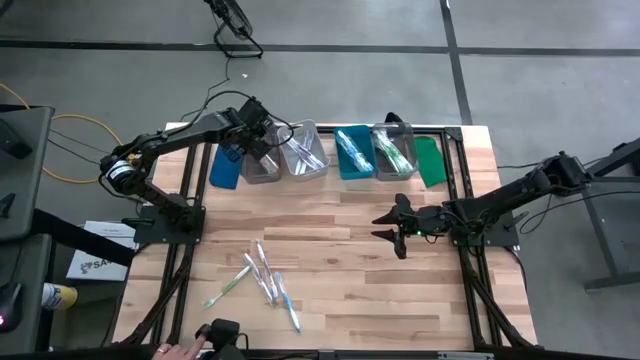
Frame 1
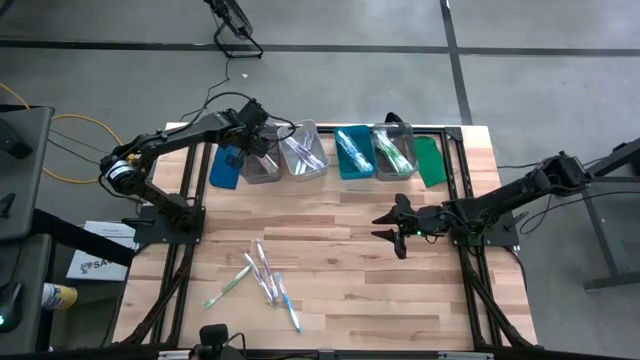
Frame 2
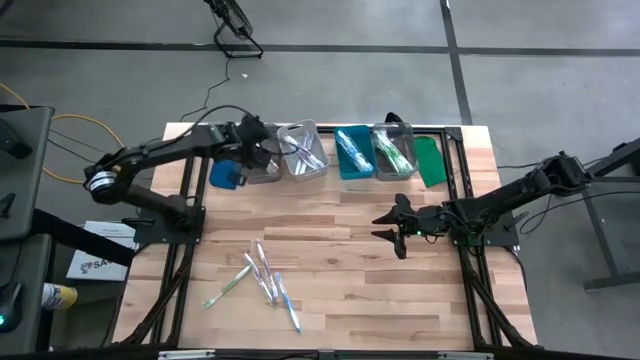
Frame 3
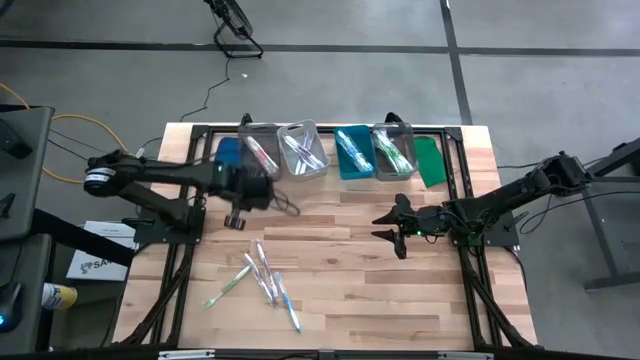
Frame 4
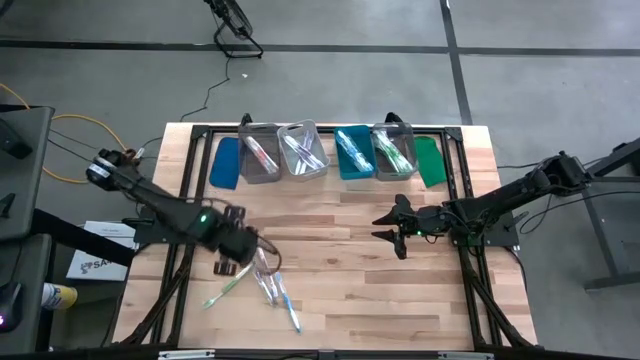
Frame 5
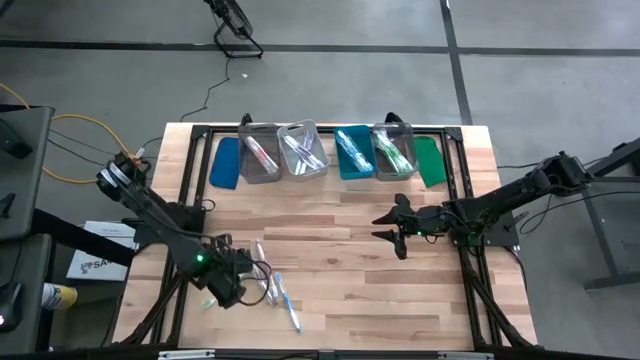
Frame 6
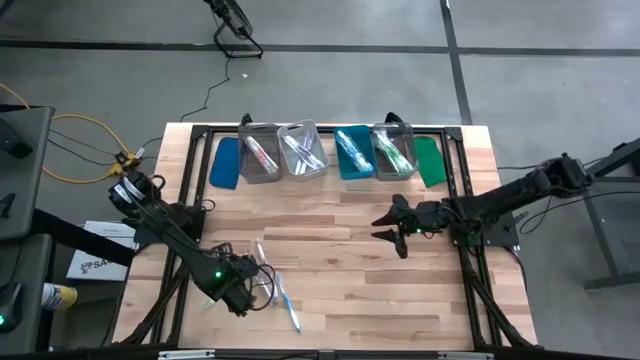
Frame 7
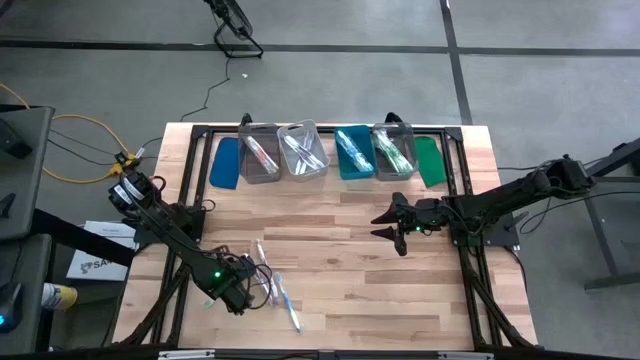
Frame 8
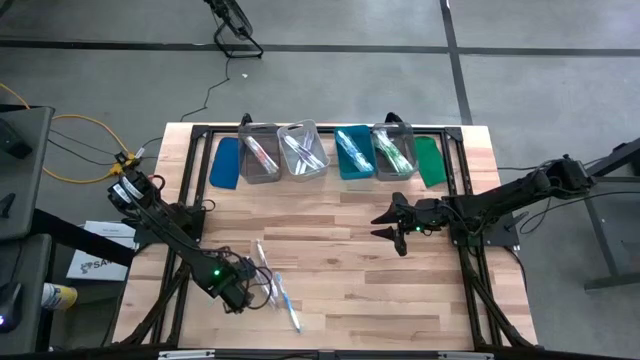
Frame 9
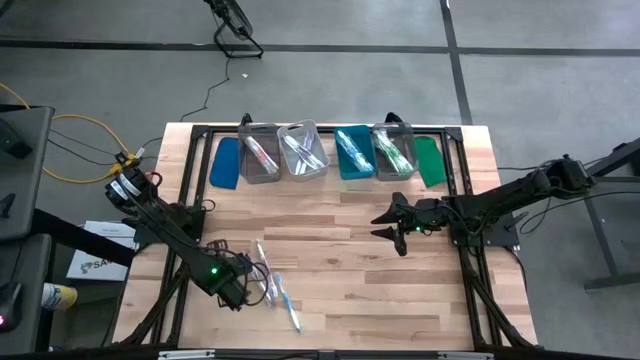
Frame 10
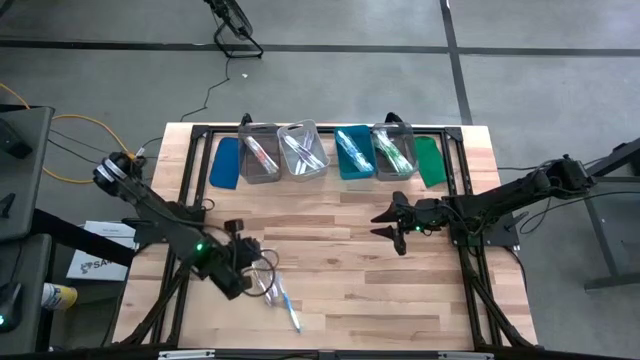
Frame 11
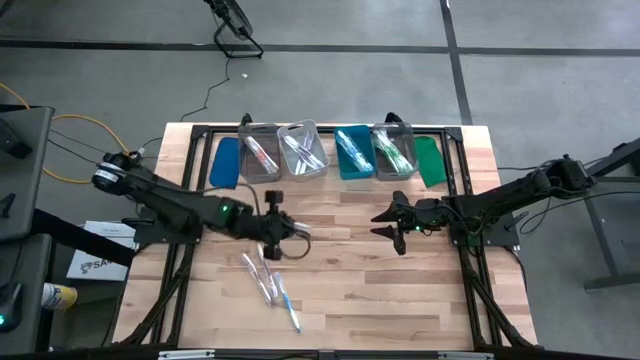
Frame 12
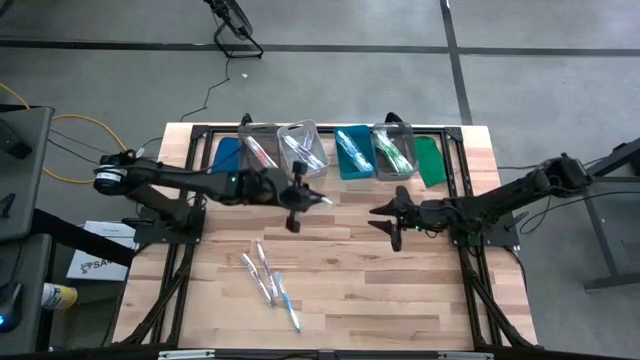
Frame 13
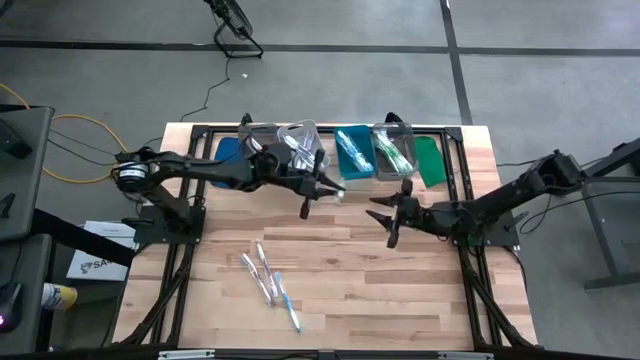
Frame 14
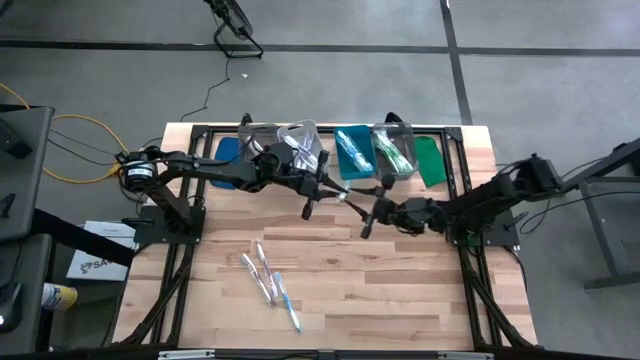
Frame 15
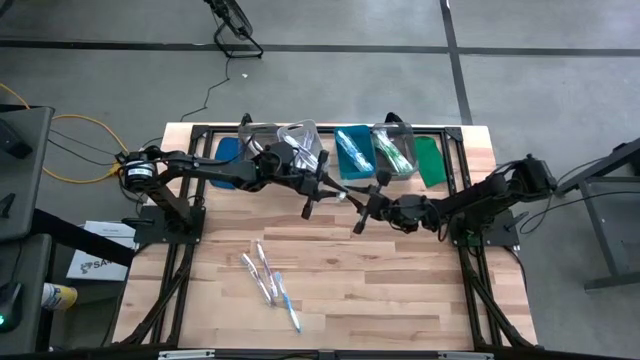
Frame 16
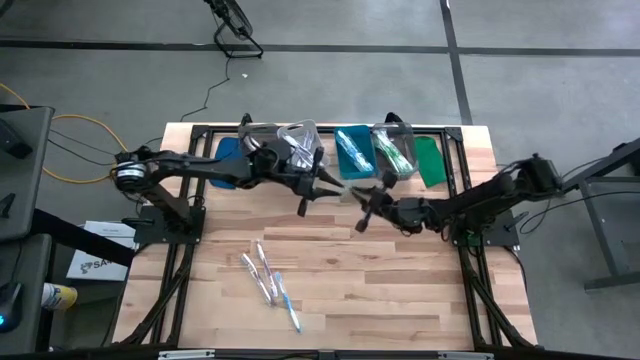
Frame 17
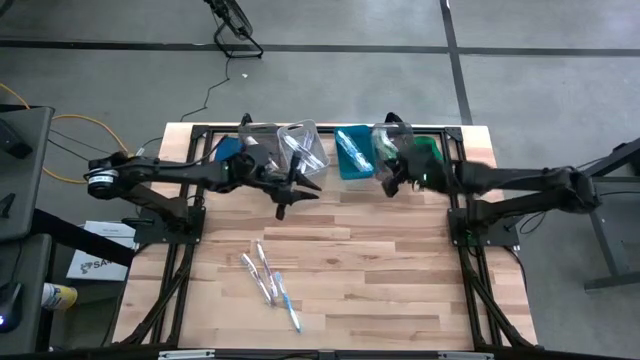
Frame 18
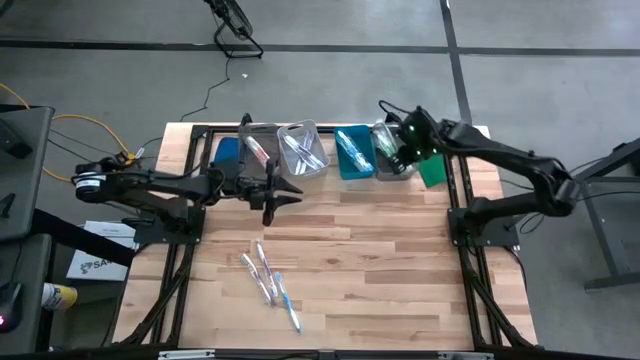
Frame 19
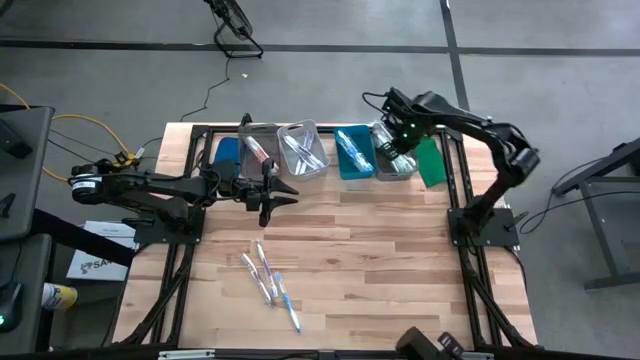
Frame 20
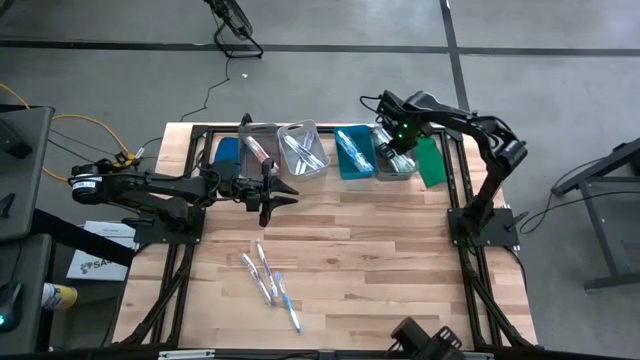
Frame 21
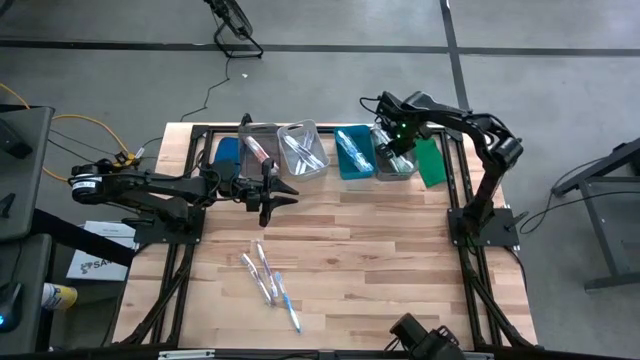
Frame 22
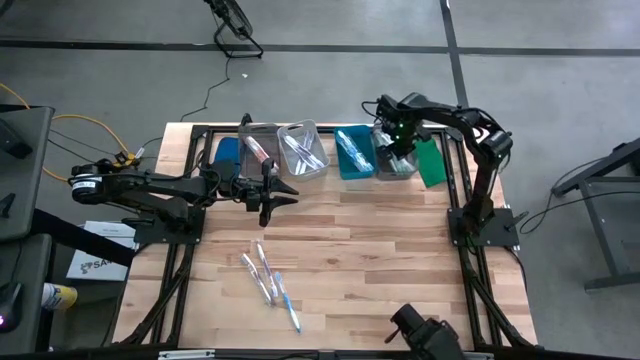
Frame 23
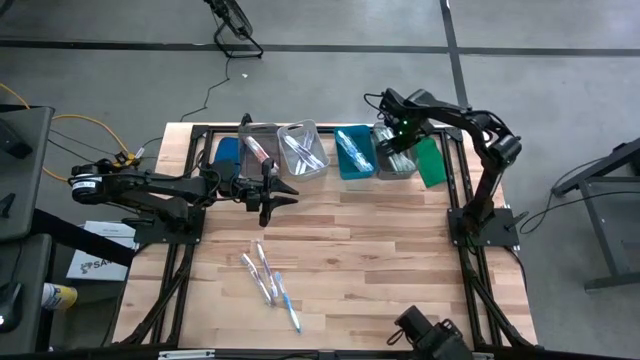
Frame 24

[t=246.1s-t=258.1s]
Task: Pick & Place Toothbrushes
Put the green toothbrush into the right black bin

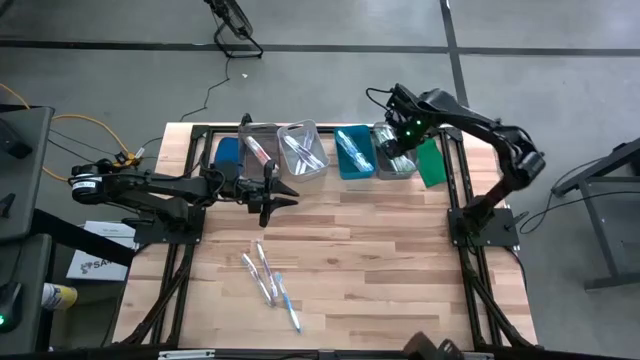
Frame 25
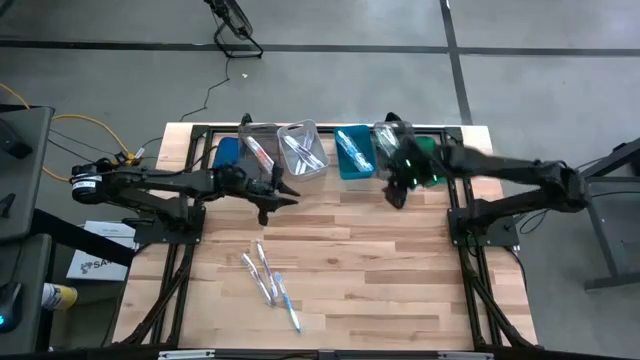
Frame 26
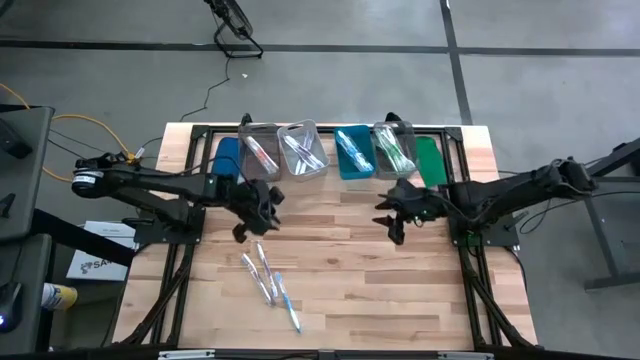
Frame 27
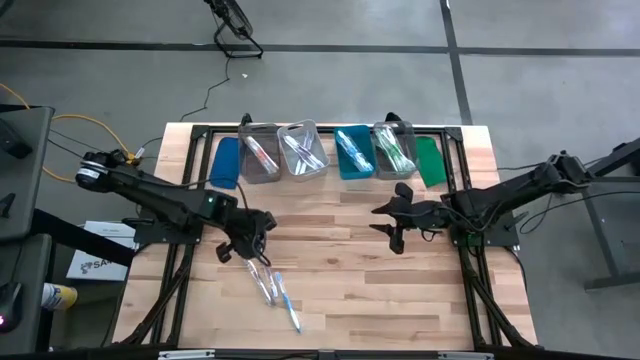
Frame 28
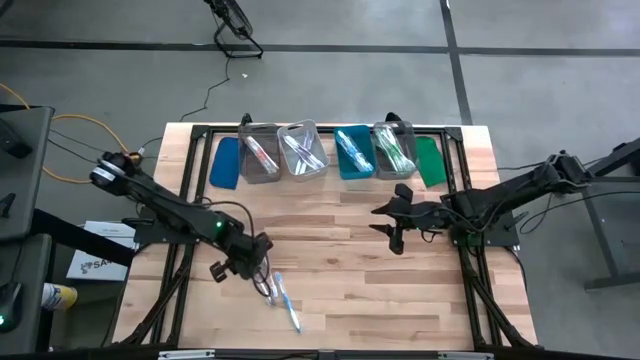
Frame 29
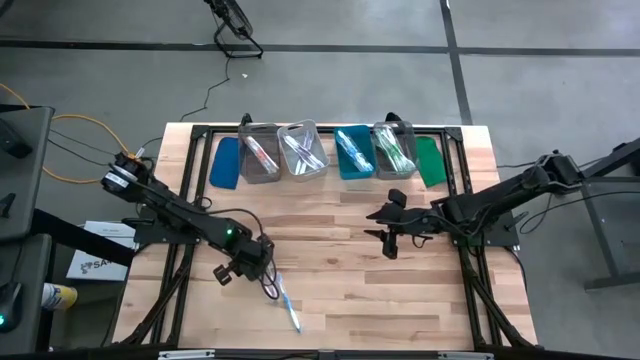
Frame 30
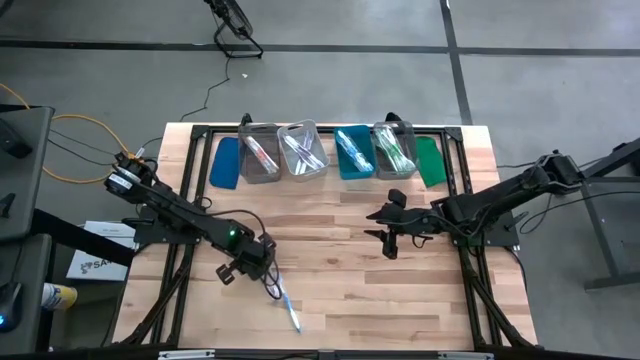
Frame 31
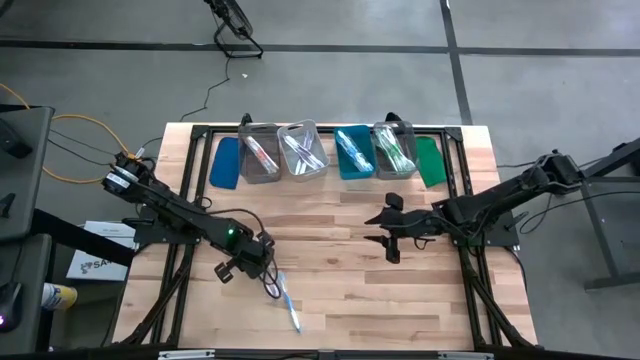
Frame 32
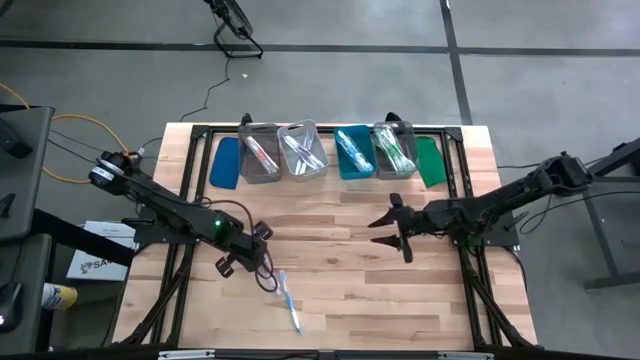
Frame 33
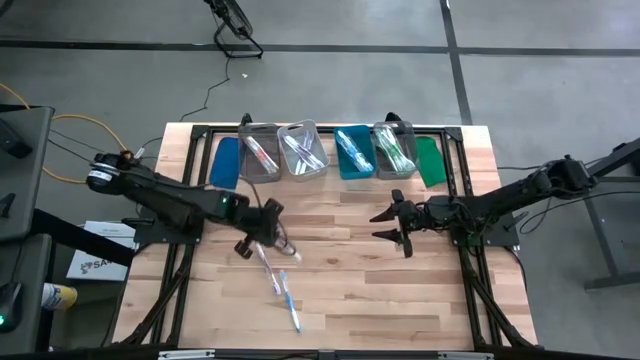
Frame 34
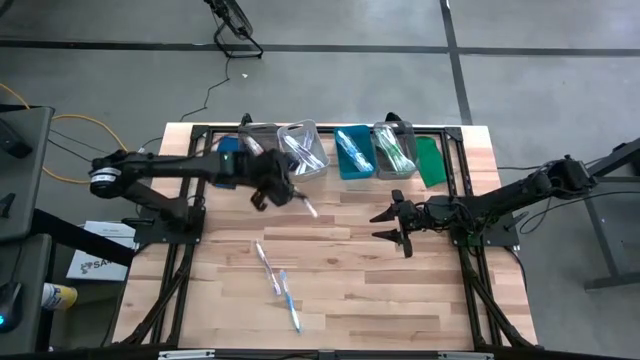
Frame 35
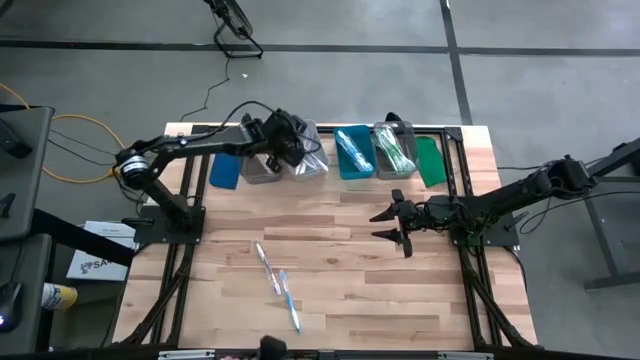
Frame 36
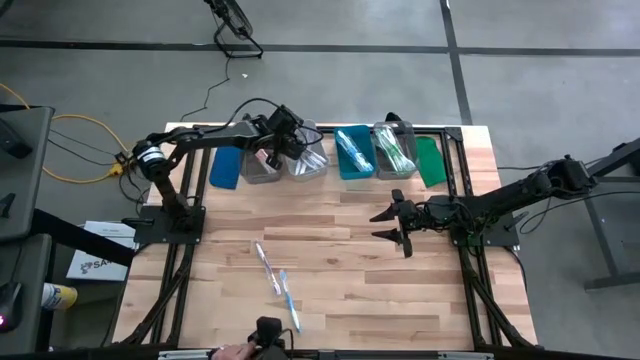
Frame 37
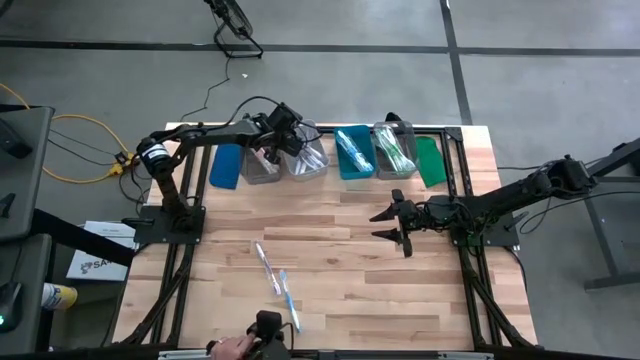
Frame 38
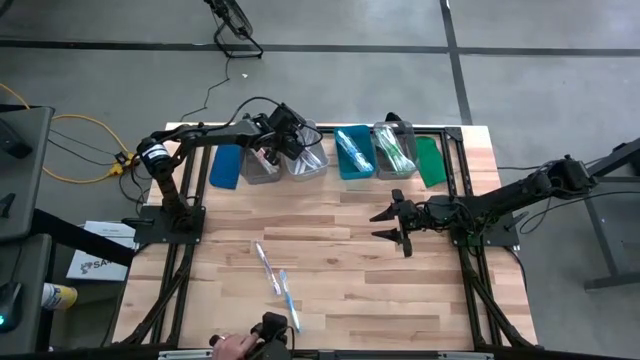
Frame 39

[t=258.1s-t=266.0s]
Put the violet toothbrush into the gray bin

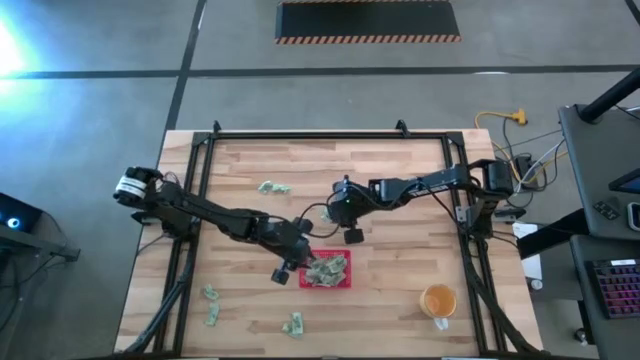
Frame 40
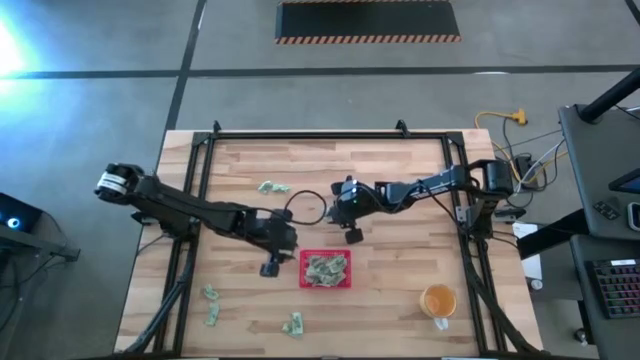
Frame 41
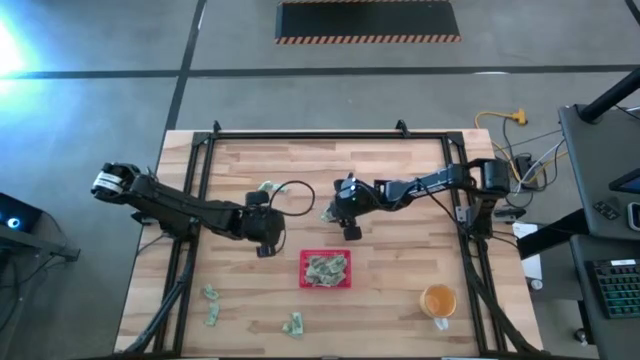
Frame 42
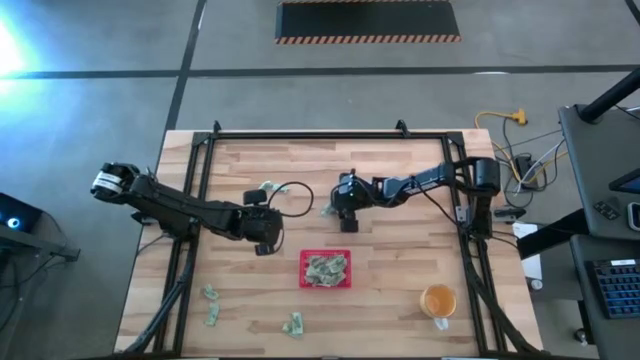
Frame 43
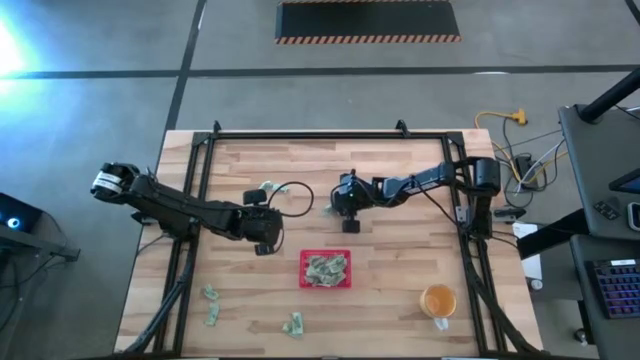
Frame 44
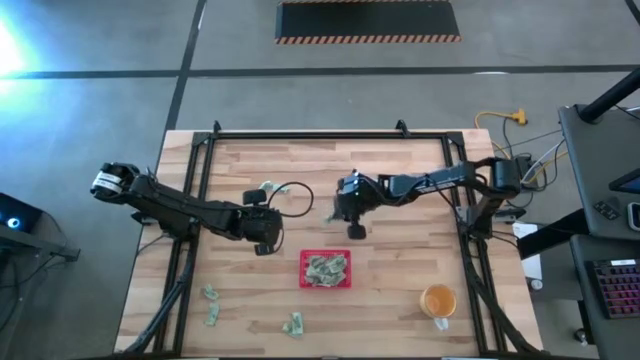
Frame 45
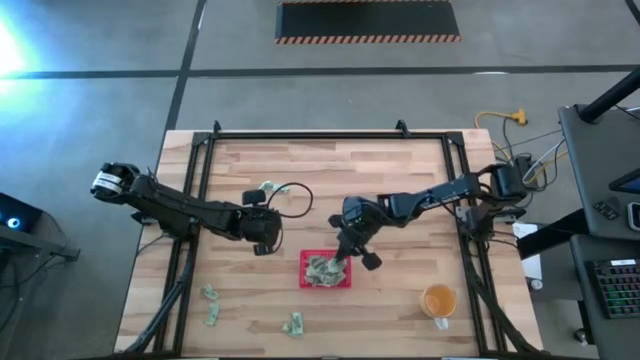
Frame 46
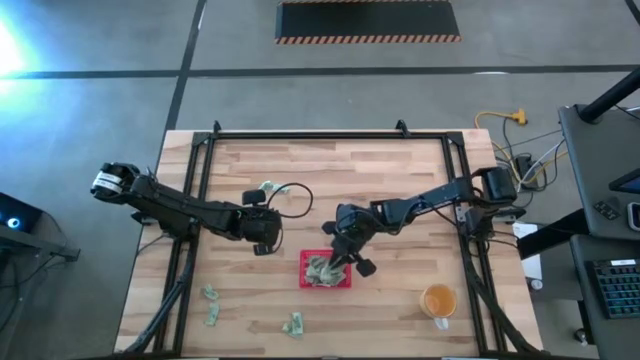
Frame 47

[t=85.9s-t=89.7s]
Task: Pick and place Stevia / Truvia into bins
Put the white stevia packet into the red bin
